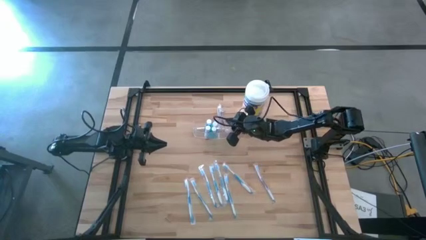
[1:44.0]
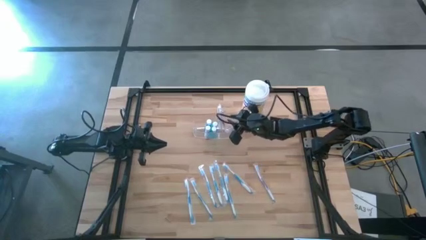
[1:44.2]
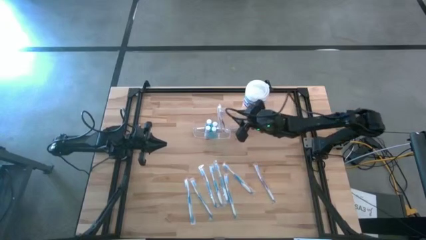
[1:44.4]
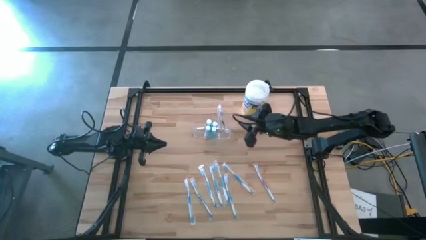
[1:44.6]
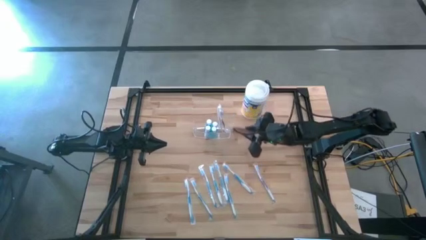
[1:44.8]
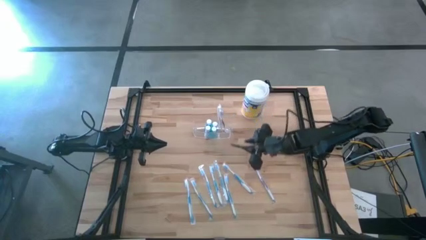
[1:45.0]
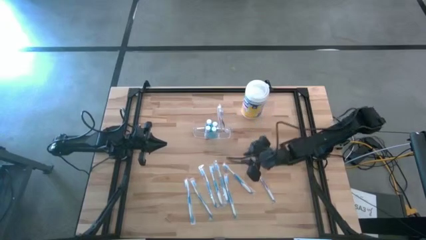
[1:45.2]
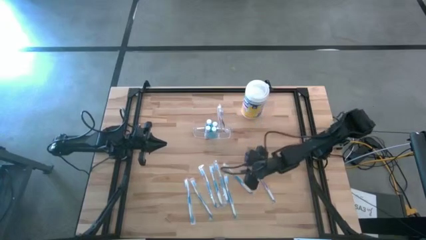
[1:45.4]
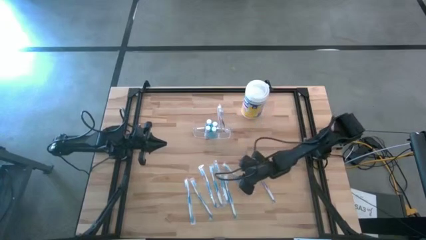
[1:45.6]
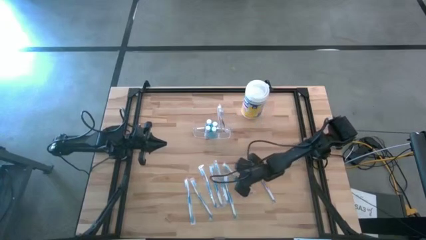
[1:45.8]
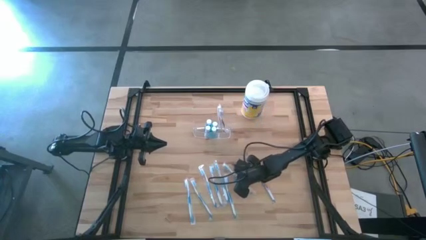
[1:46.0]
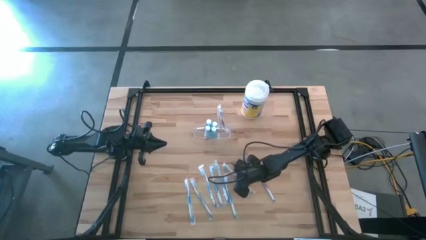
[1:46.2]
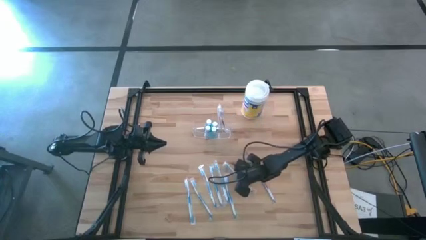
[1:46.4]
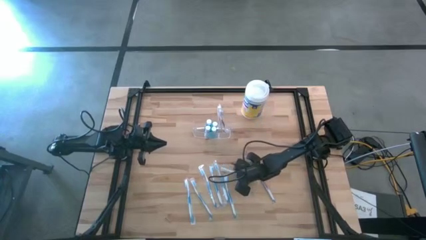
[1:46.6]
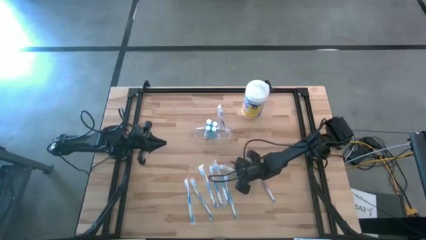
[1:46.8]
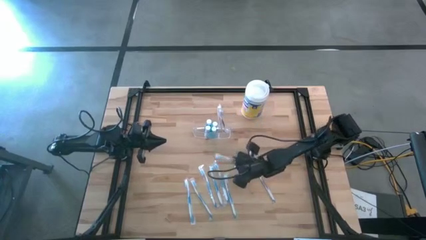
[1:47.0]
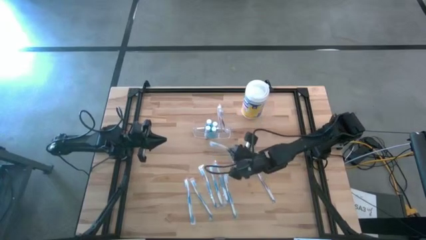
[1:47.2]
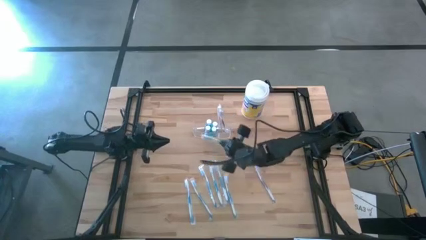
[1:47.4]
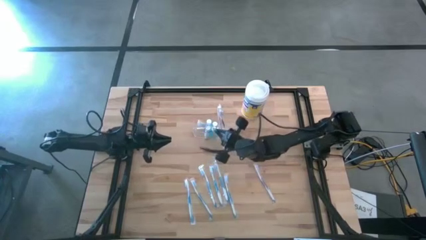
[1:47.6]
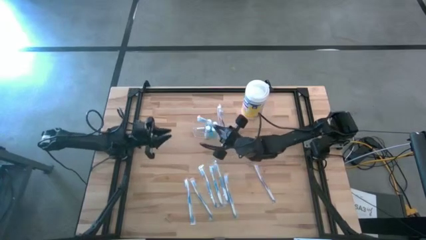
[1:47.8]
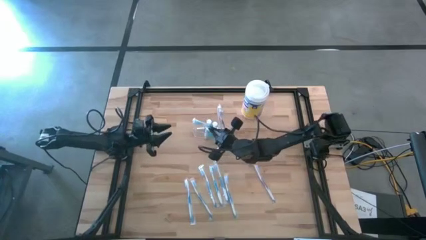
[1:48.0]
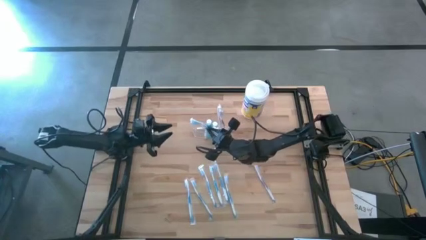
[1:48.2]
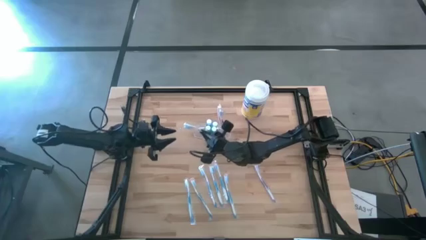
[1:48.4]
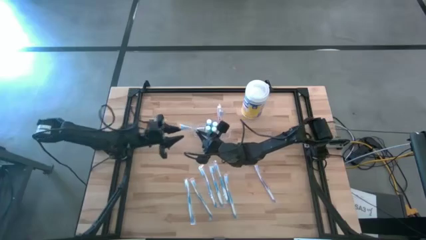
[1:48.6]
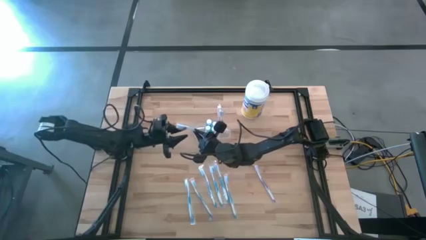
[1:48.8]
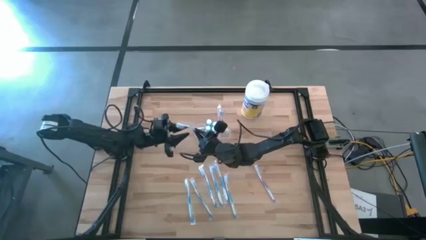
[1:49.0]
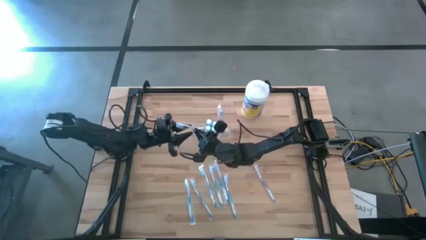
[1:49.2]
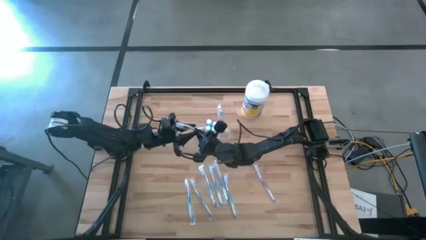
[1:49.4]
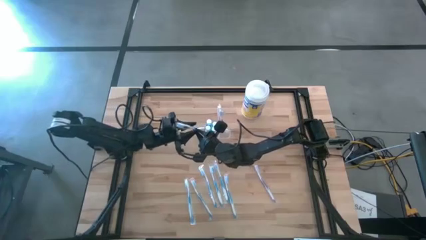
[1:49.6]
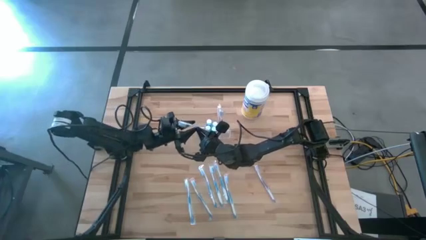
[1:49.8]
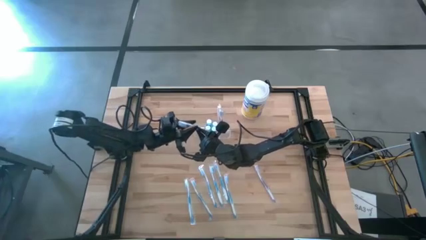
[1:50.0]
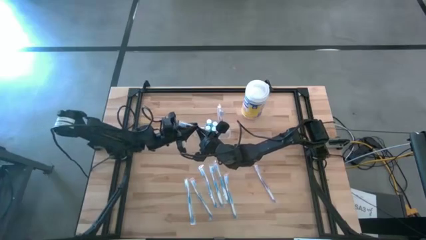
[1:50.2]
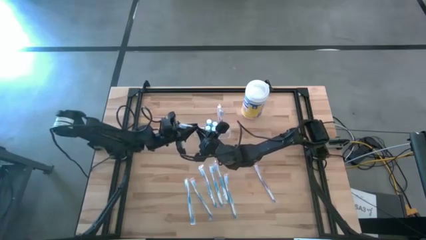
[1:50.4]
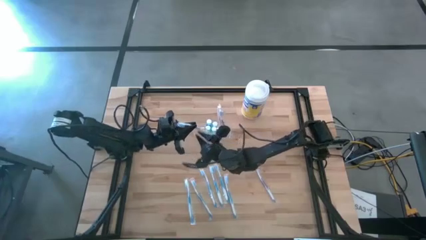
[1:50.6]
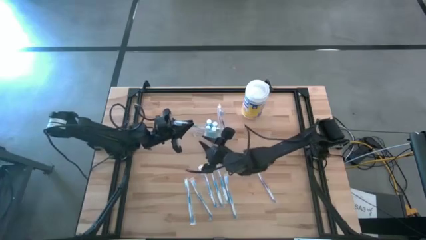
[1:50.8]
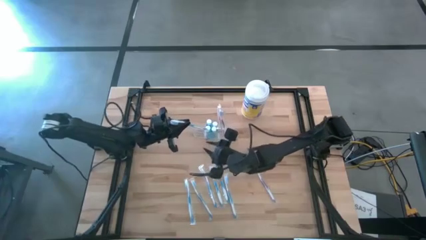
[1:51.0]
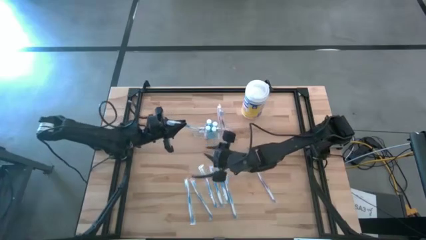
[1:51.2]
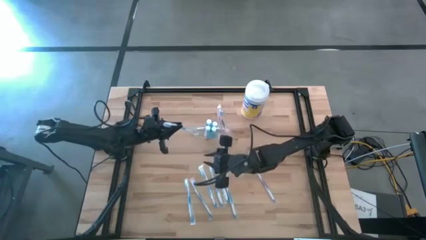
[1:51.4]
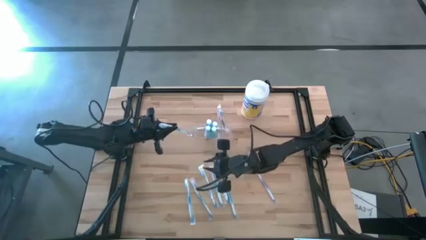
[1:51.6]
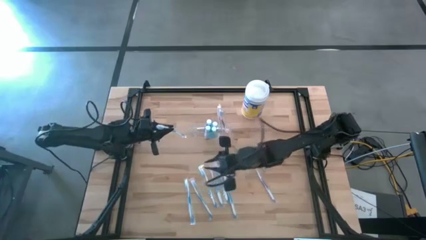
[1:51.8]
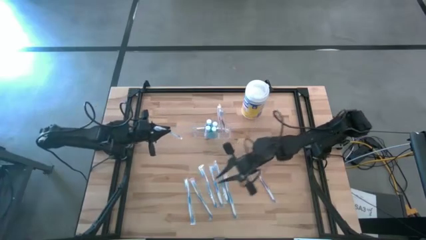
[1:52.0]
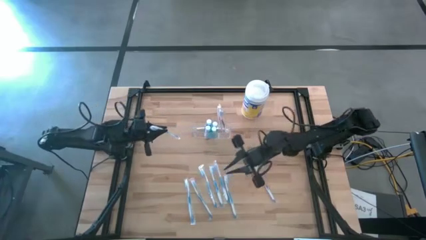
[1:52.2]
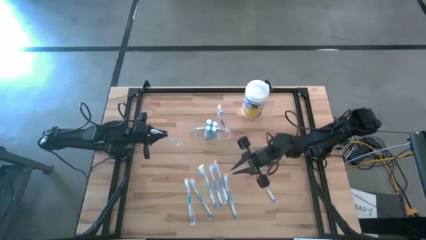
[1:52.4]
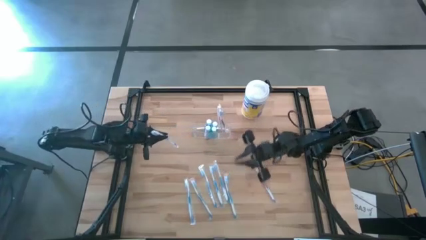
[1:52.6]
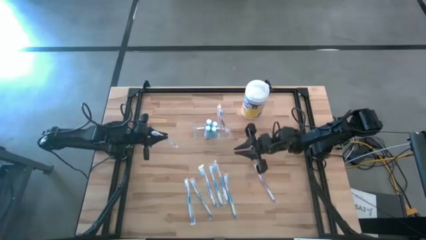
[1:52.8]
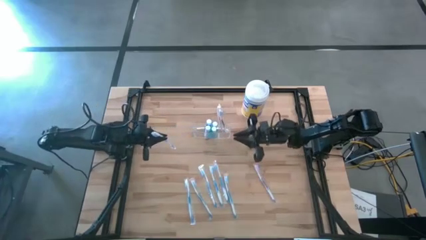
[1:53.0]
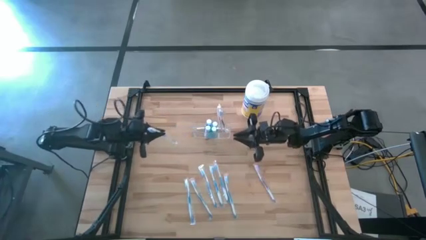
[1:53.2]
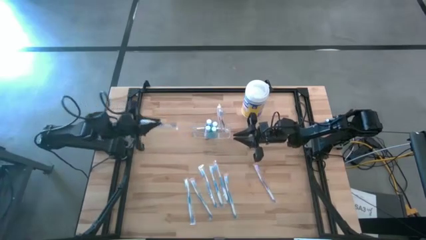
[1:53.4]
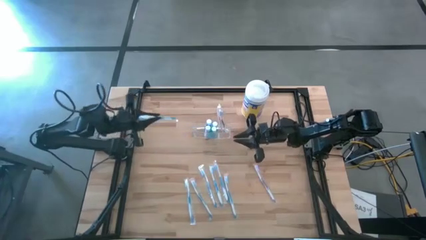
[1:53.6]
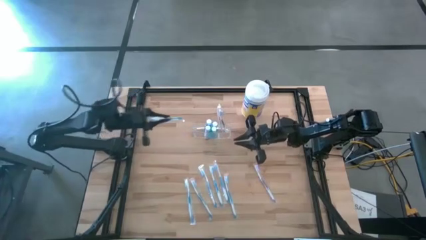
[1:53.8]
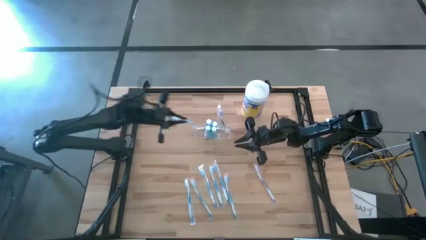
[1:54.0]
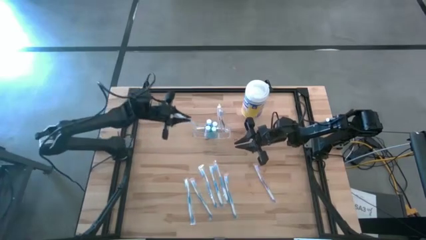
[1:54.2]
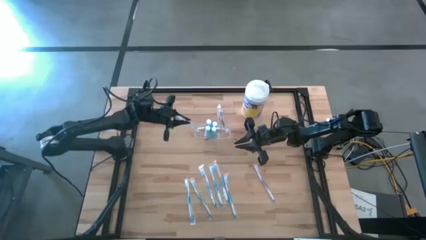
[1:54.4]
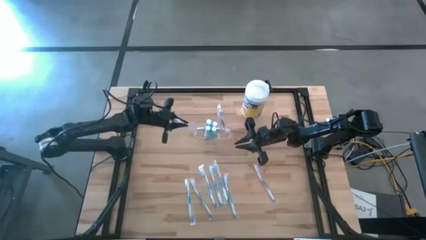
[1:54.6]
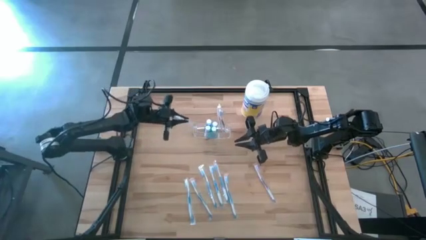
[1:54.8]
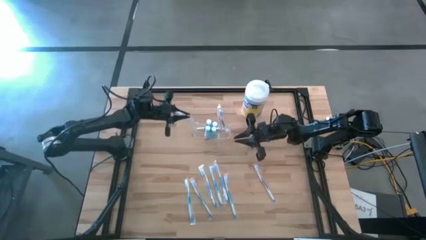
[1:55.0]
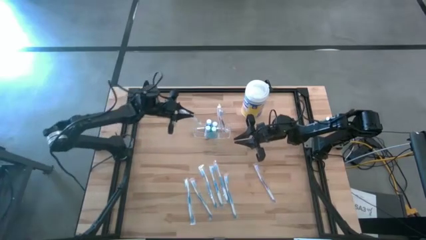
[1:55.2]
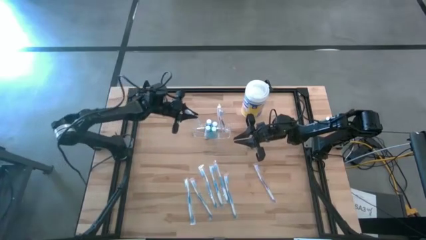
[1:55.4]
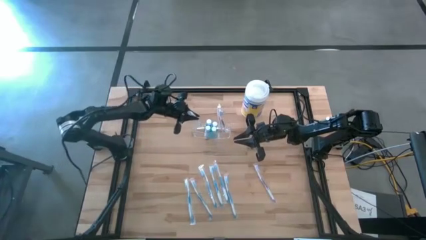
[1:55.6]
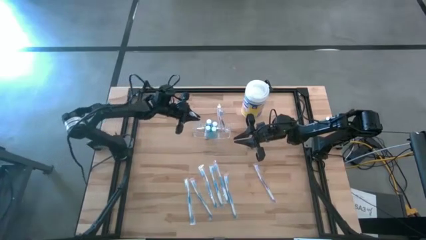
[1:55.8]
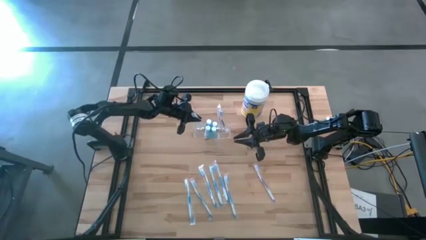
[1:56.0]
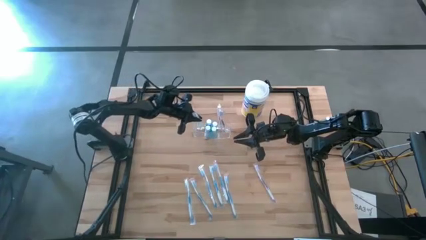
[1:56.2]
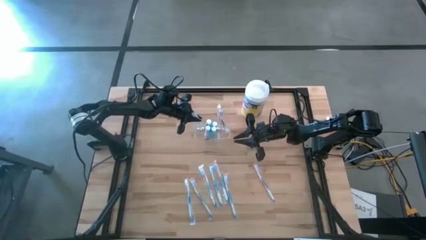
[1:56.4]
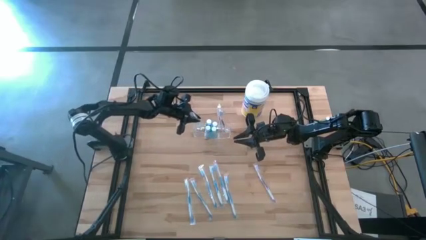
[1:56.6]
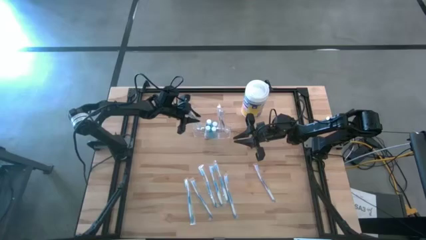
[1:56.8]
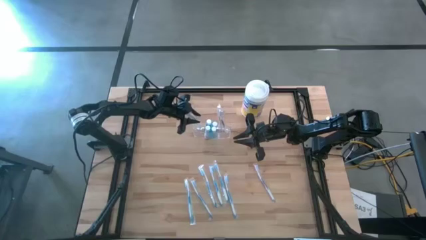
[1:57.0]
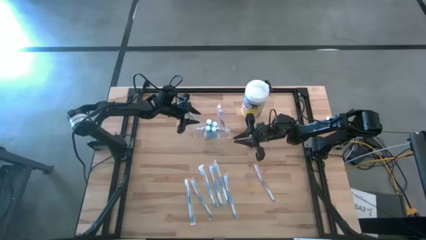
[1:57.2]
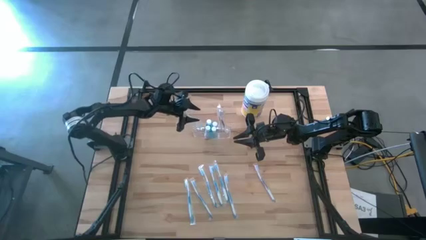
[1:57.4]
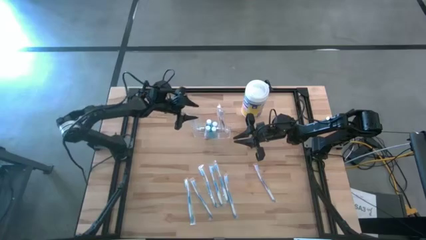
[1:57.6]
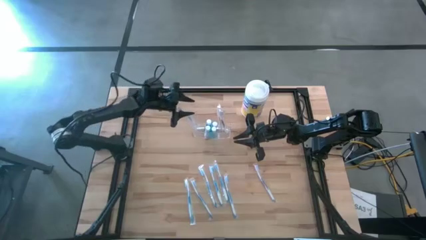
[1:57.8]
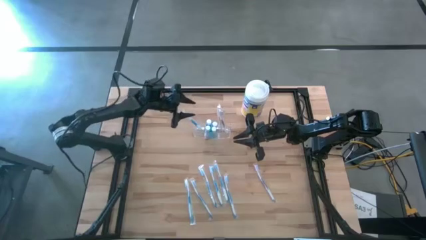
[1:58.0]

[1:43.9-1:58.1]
Task: Pick & Place toothbrushing station
Put the blue toothbrush into the transparent organizer
